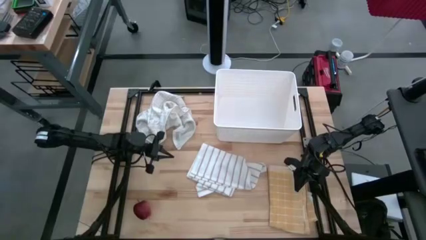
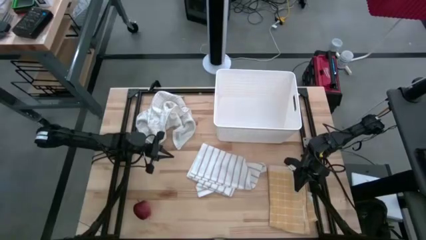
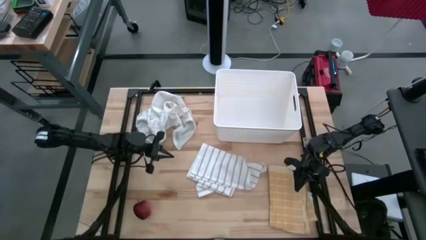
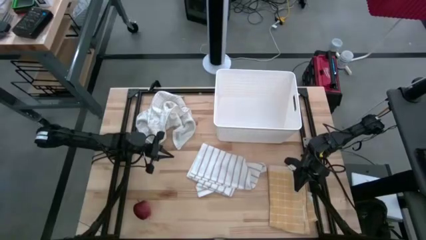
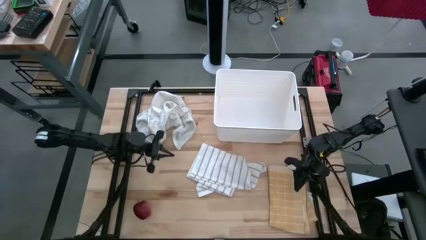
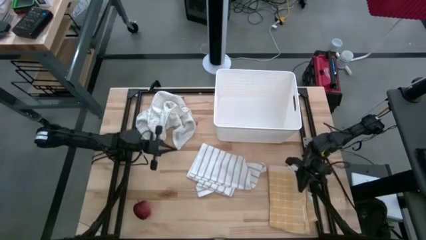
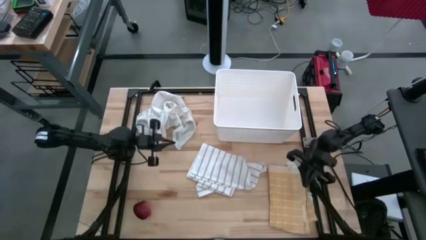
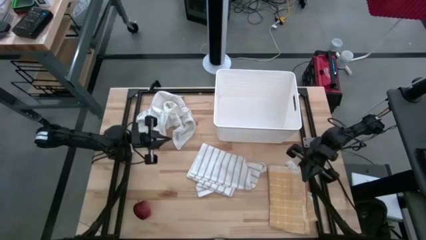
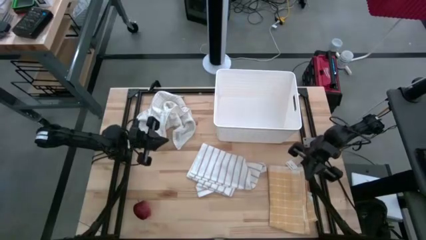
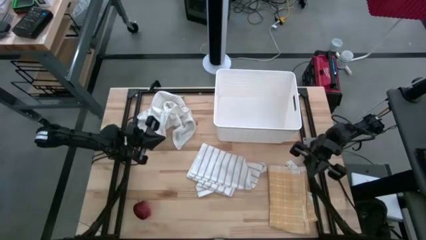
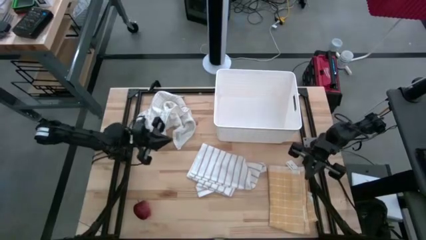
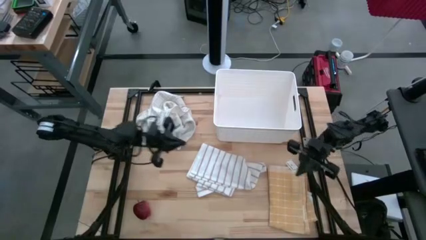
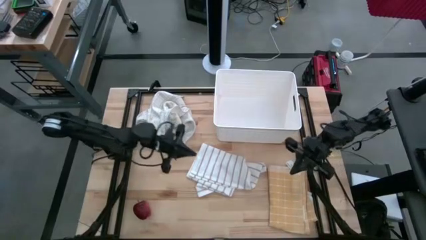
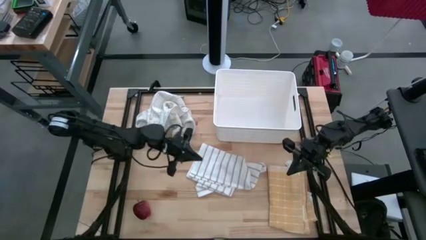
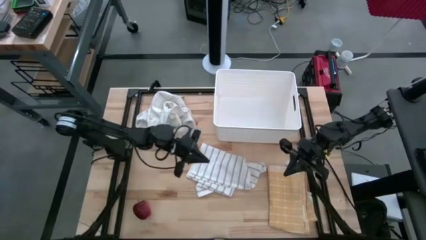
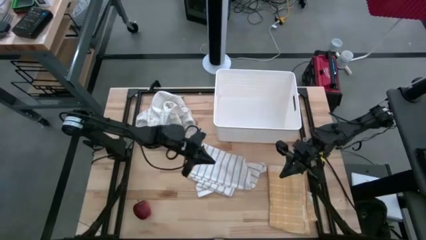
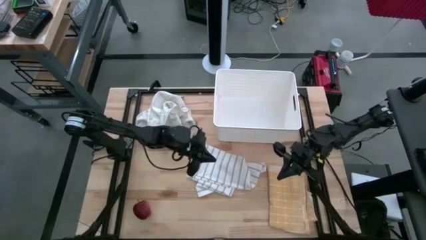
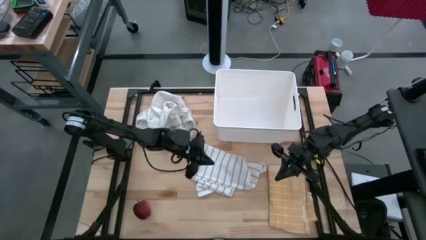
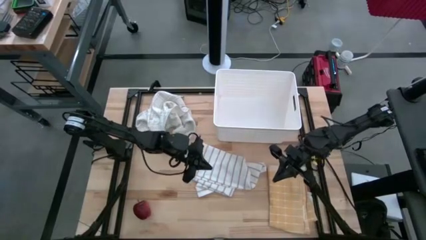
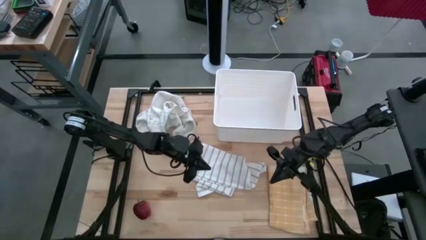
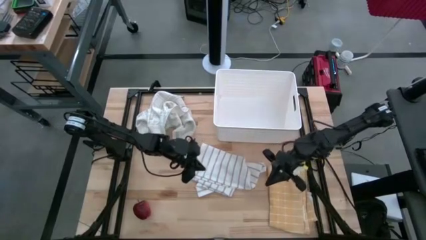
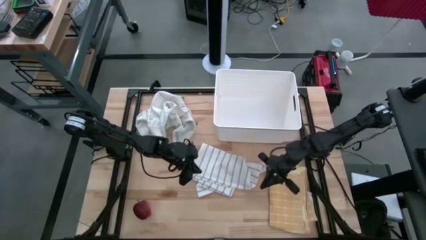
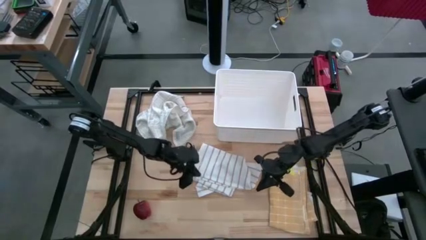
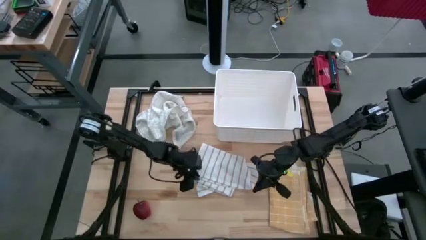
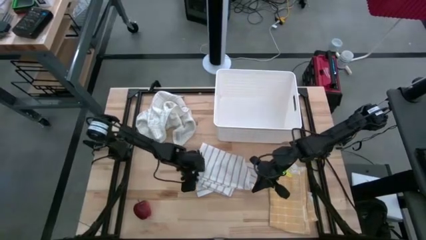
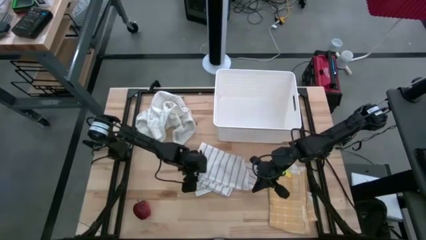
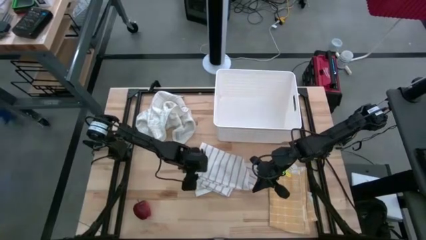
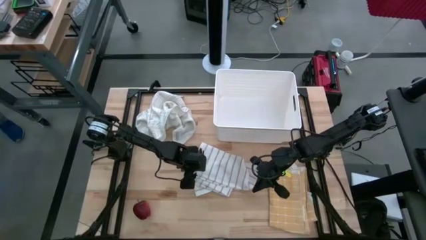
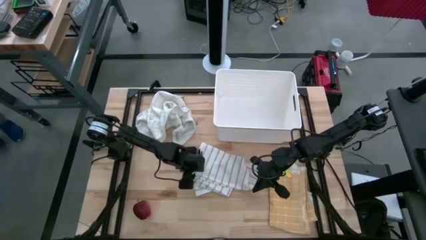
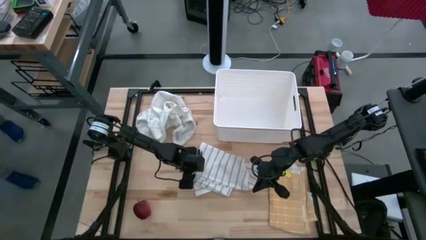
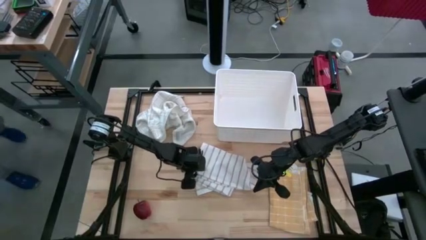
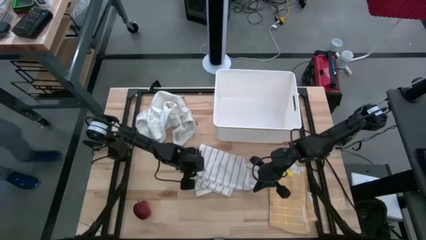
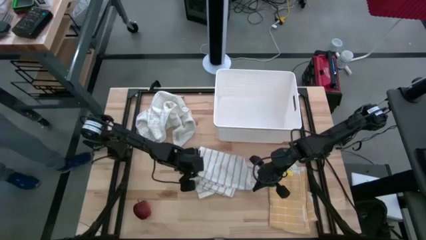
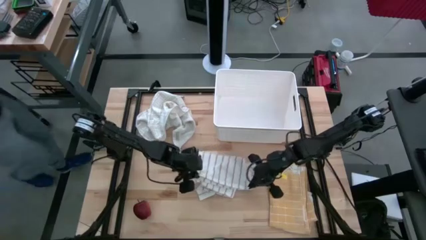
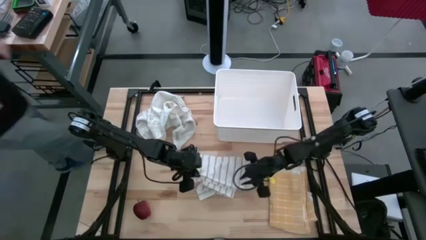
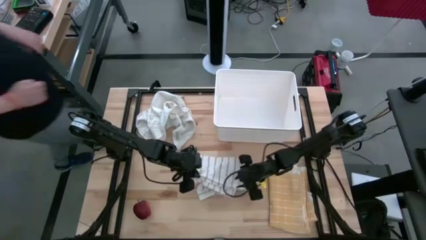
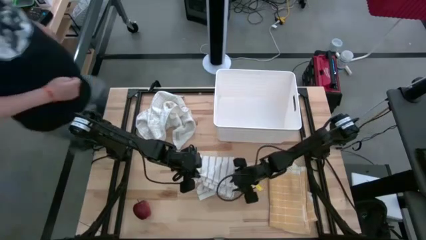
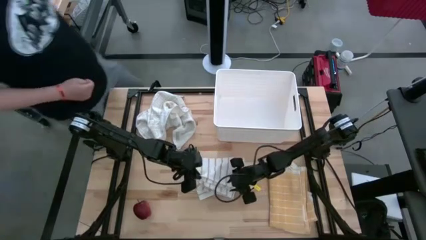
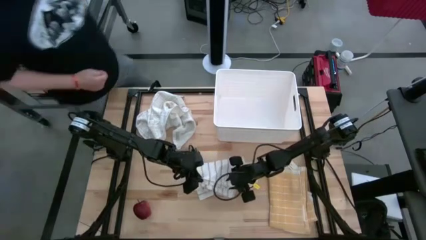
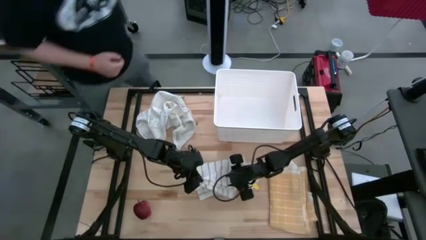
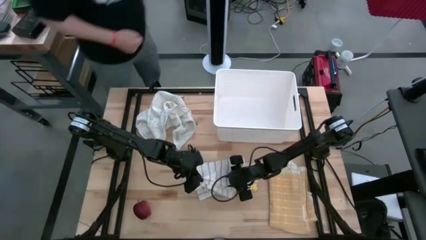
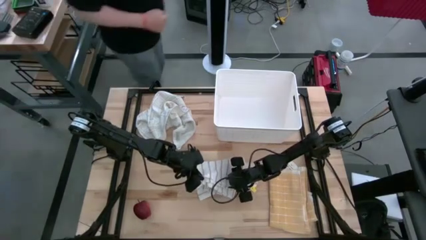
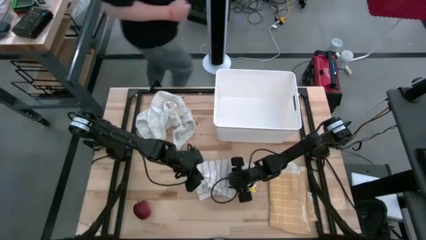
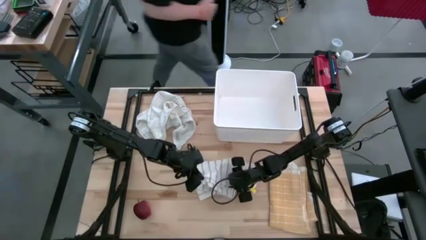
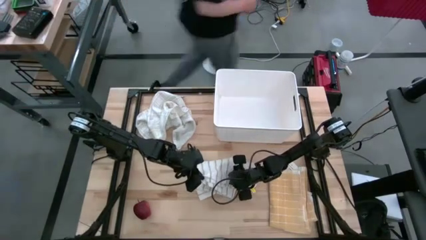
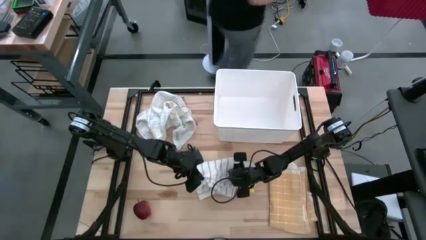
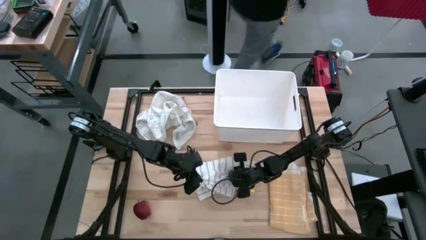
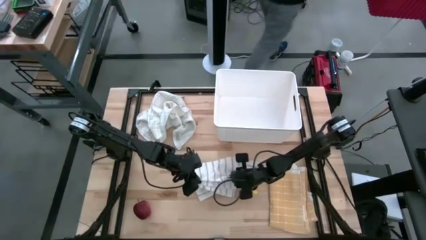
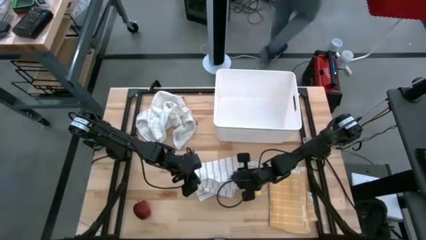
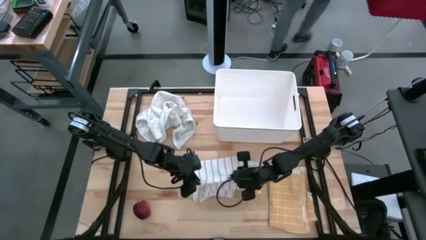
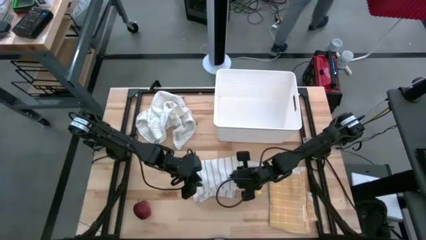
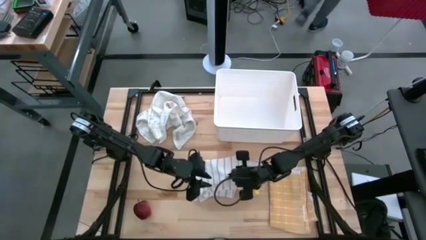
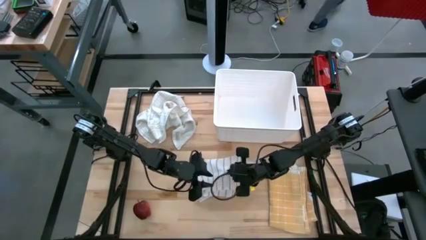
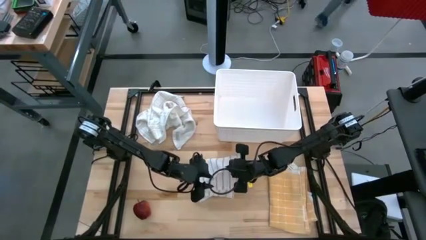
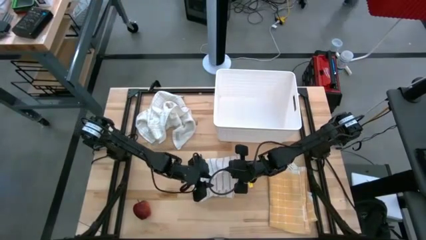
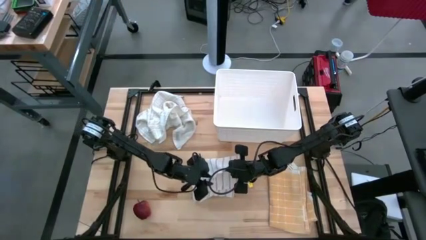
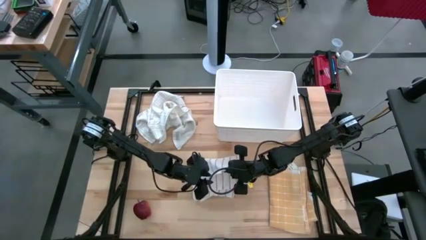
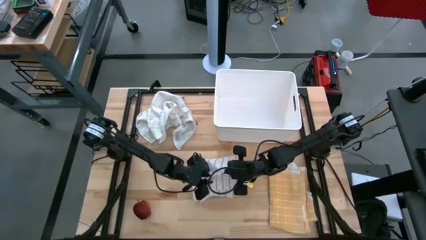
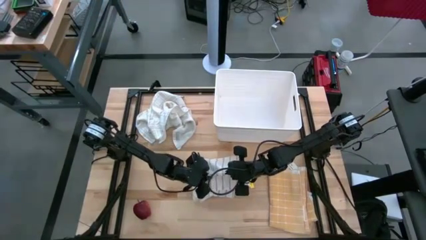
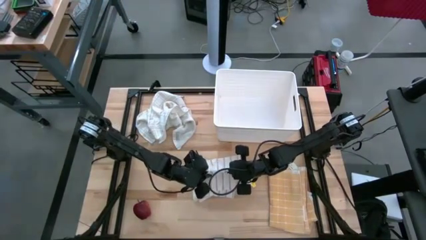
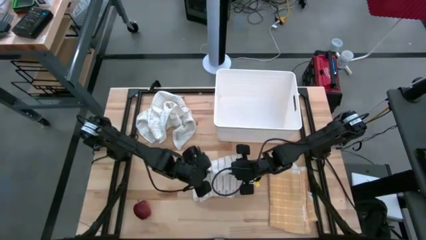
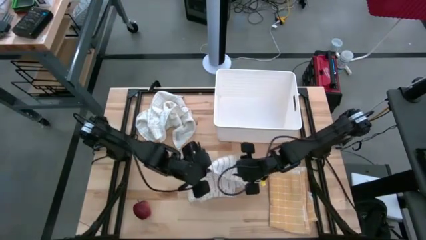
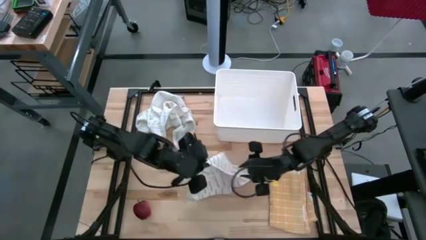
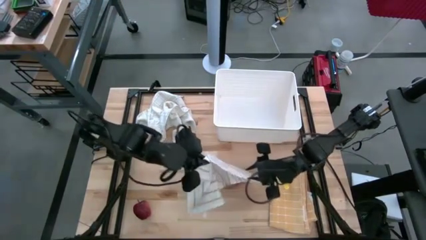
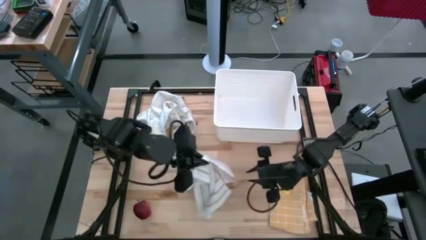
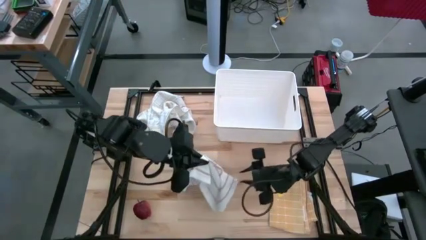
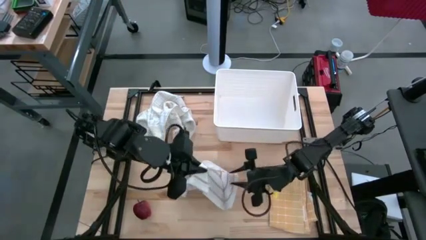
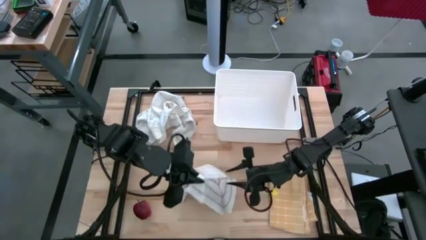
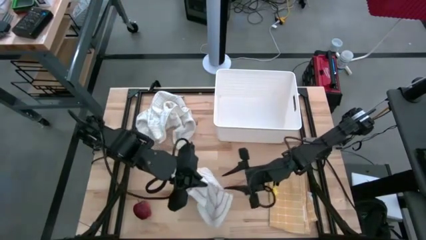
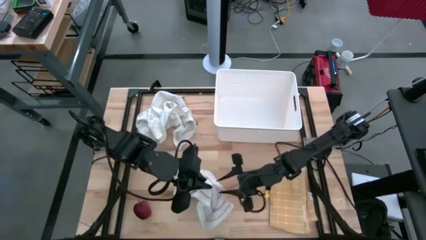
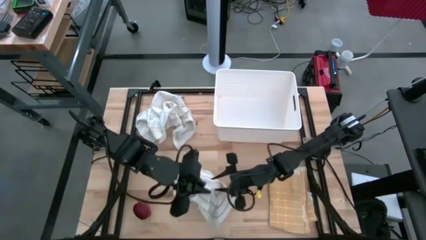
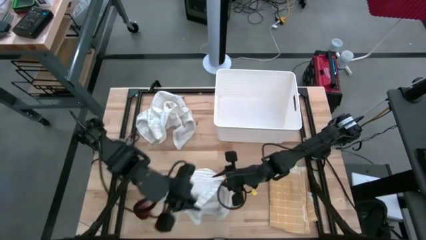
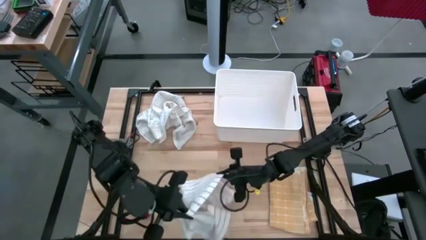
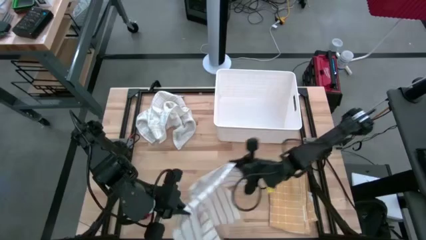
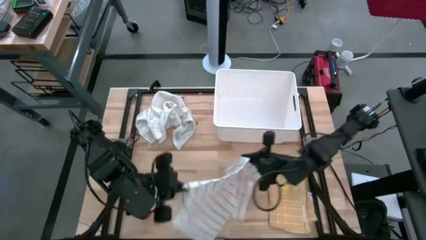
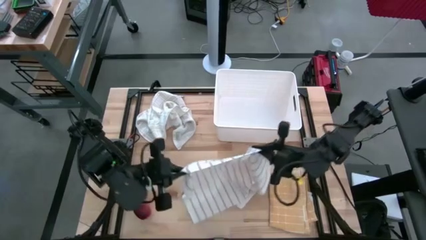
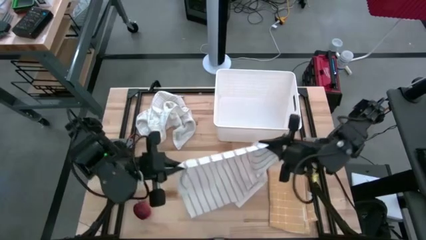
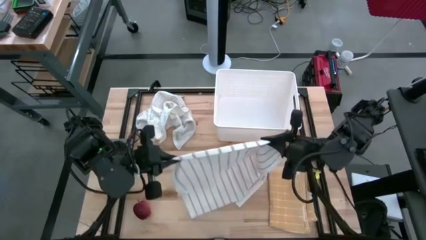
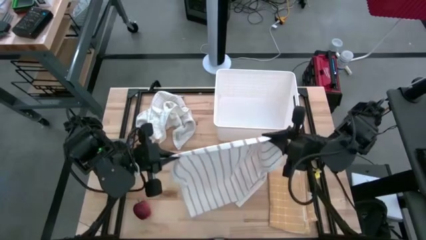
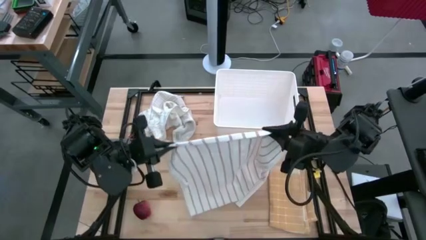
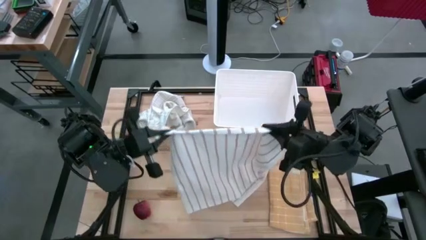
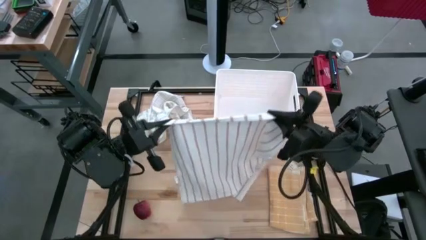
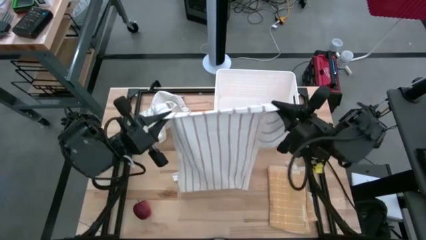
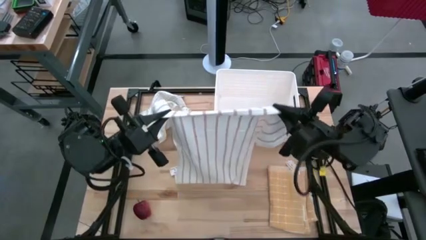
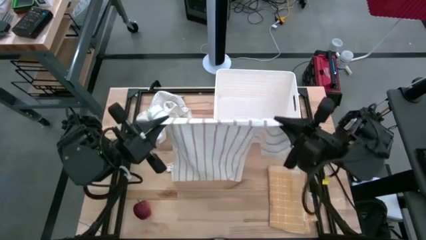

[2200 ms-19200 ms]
Task: Fold towel
Fold the white striped towel
